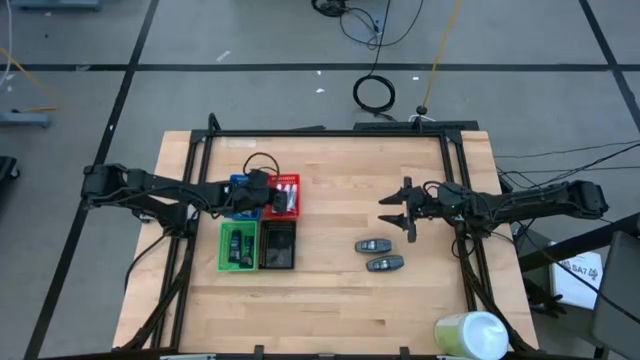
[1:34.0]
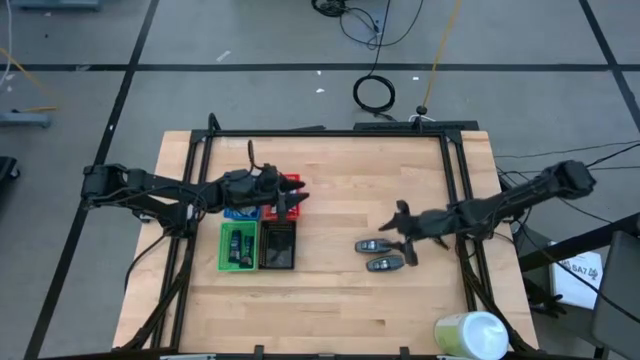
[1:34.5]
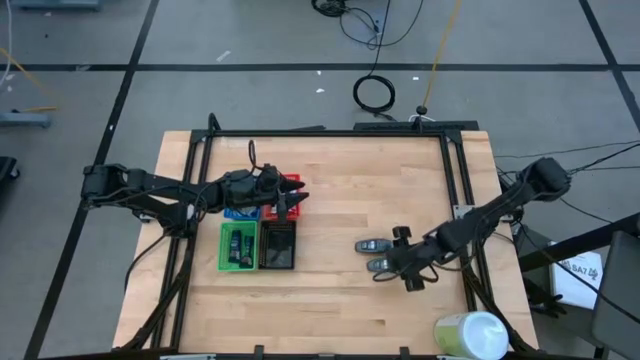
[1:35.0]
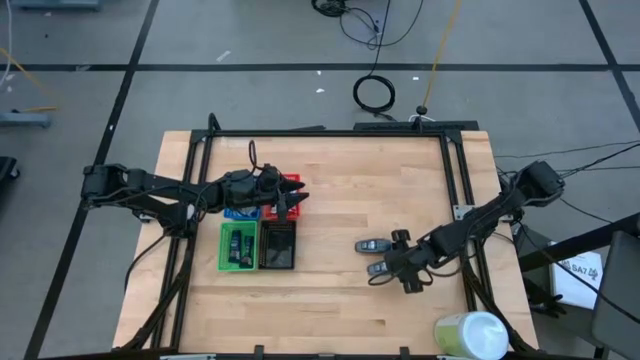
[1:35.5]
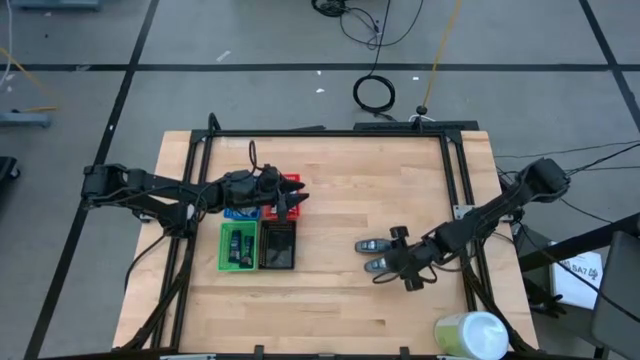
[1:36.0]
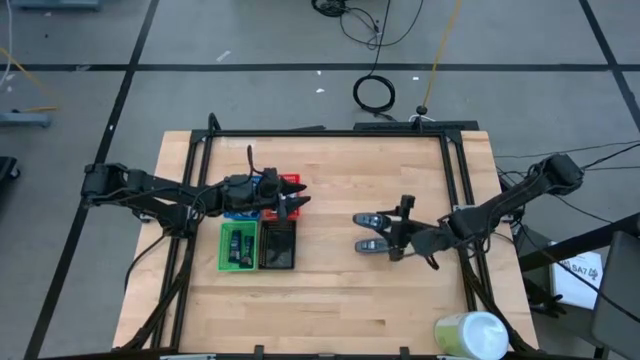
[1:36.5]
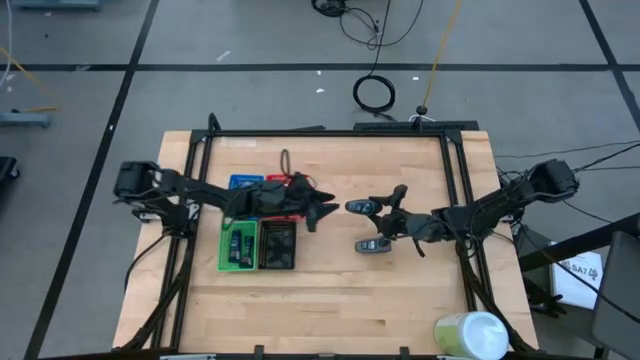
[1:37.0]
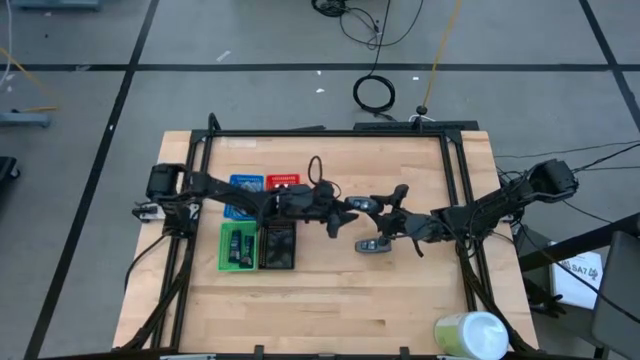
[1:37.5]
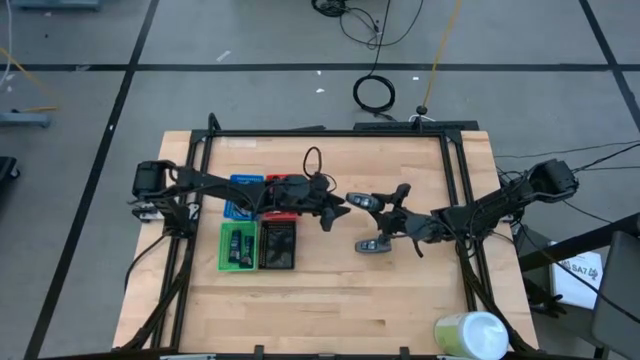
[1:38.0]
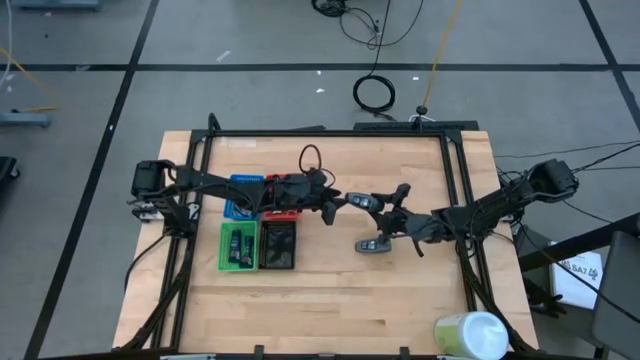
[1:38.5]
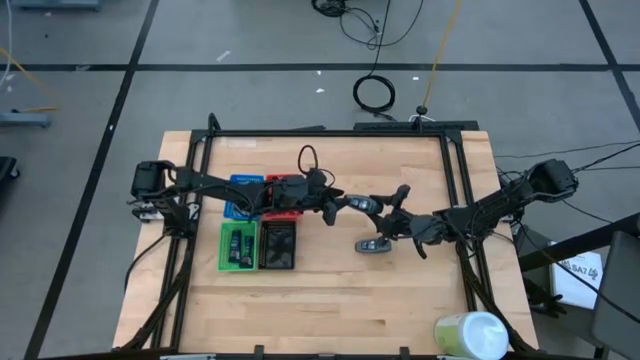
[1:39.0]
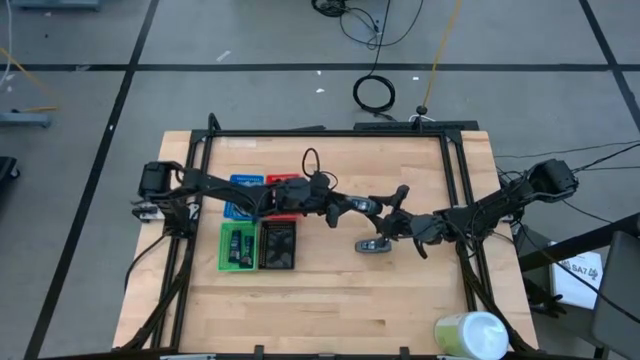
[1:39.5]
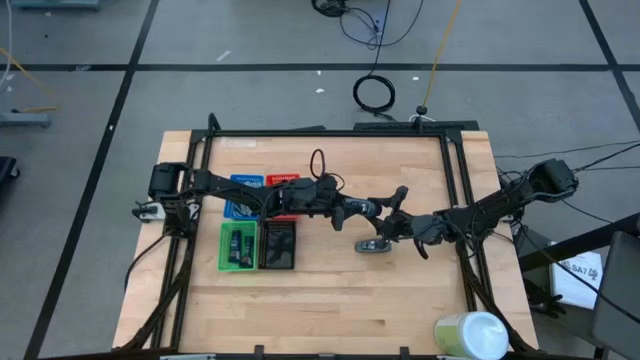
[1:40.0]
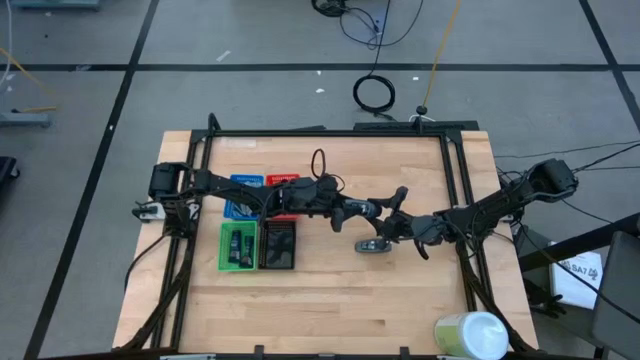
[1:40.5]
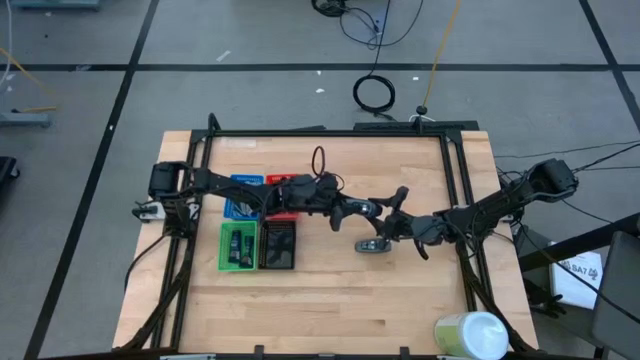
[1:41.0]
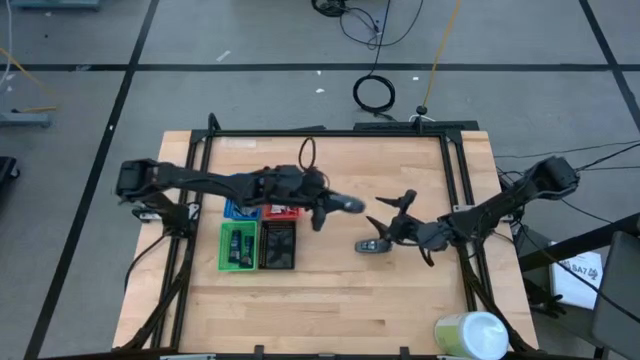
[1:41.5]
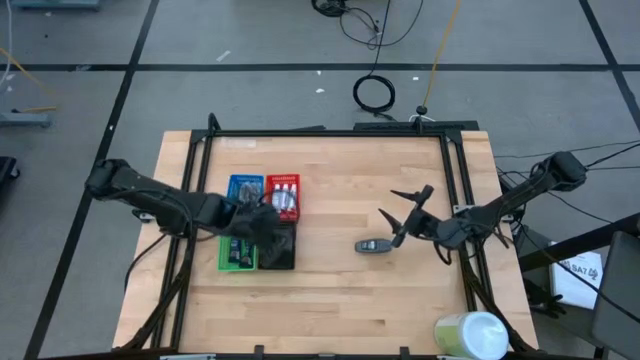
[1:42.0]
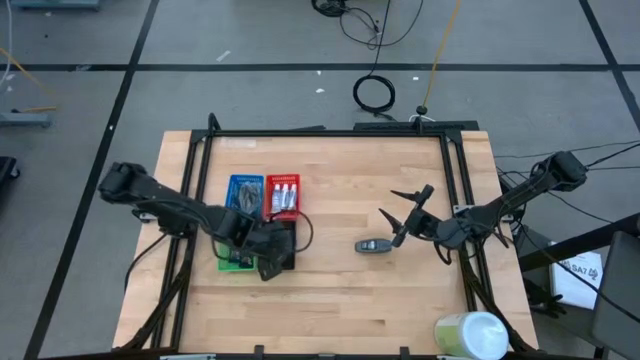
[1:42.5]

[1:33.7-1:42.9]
Task: Pick & Place Travel size toiletries
Put the bottom gray deodorant into the black bin

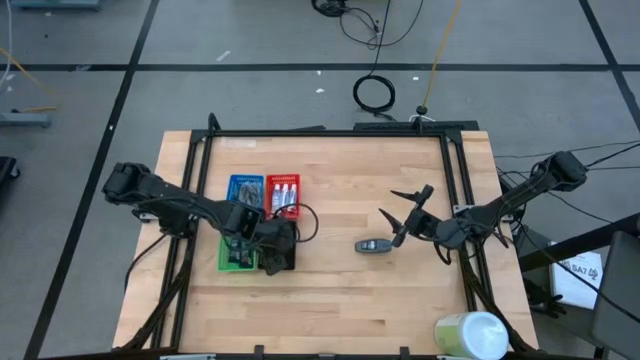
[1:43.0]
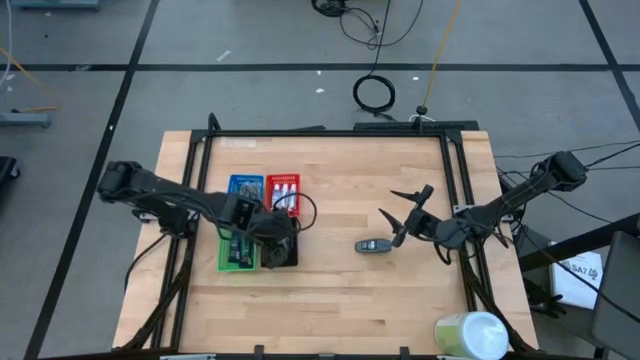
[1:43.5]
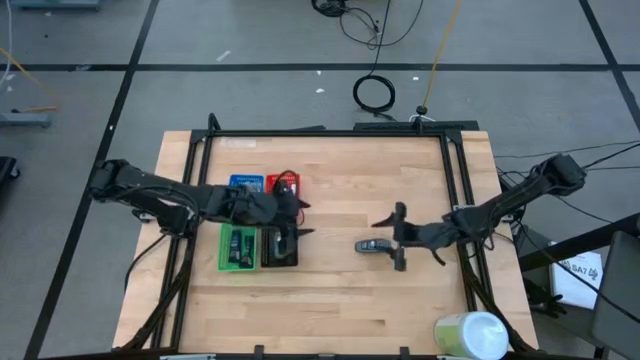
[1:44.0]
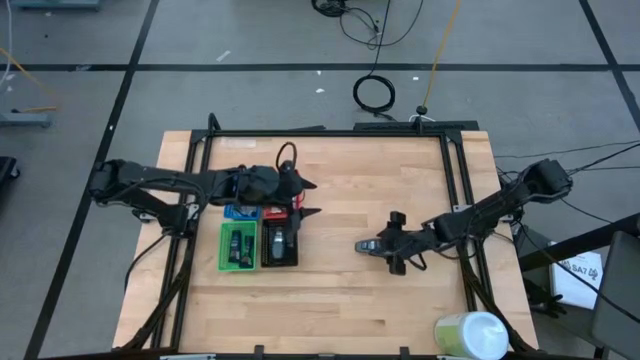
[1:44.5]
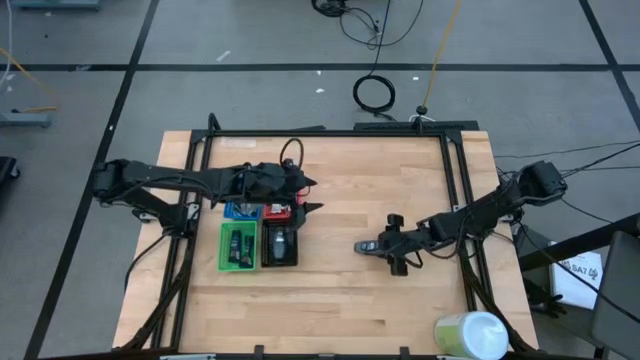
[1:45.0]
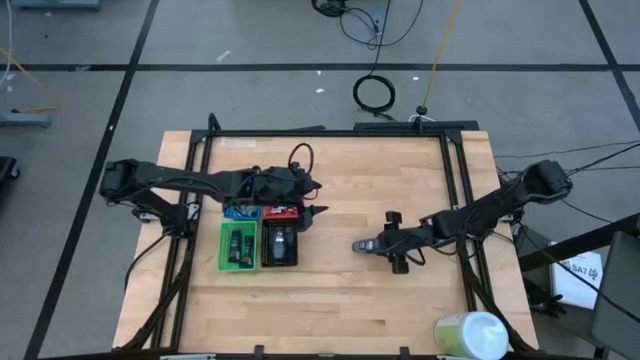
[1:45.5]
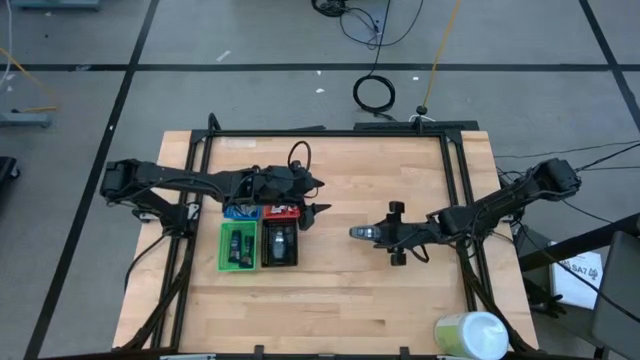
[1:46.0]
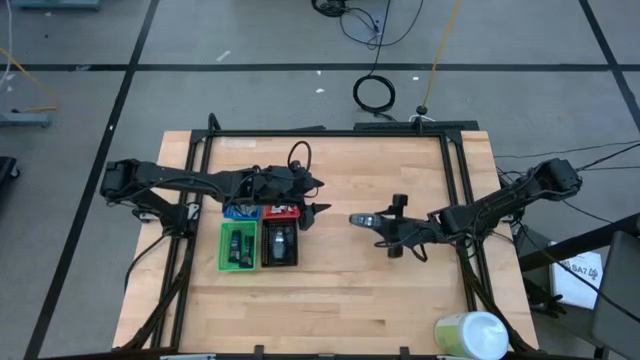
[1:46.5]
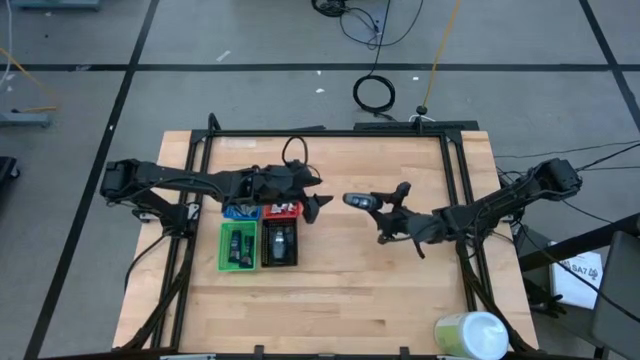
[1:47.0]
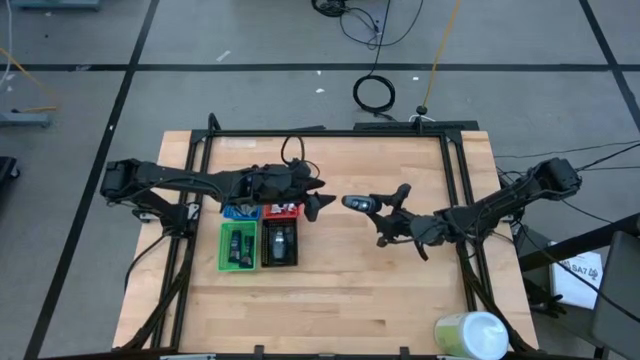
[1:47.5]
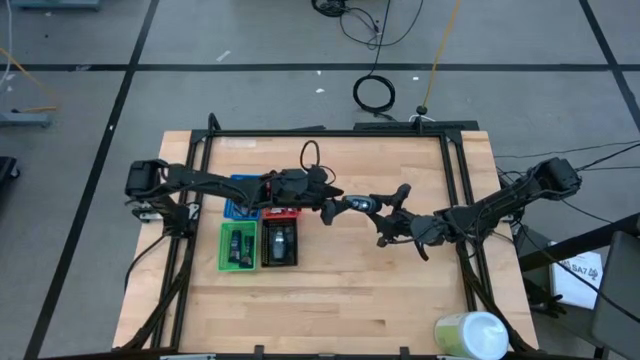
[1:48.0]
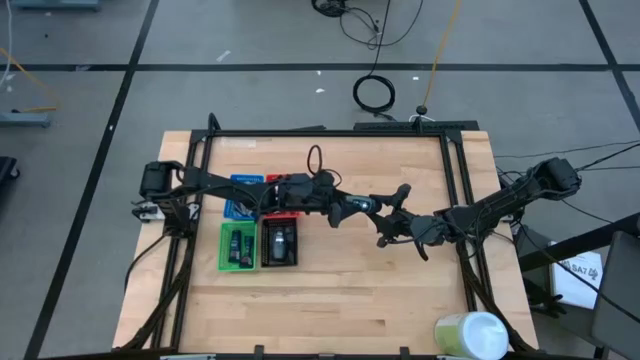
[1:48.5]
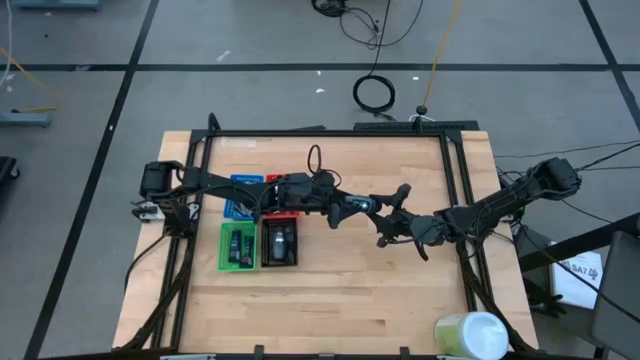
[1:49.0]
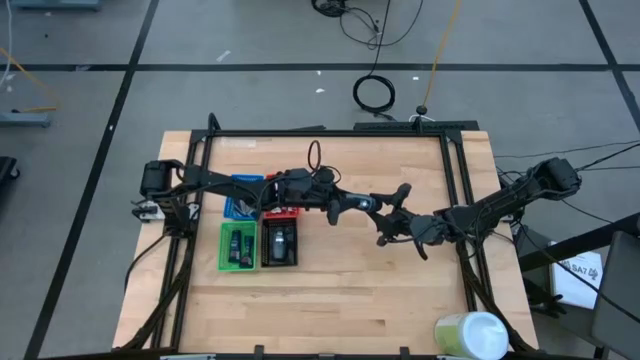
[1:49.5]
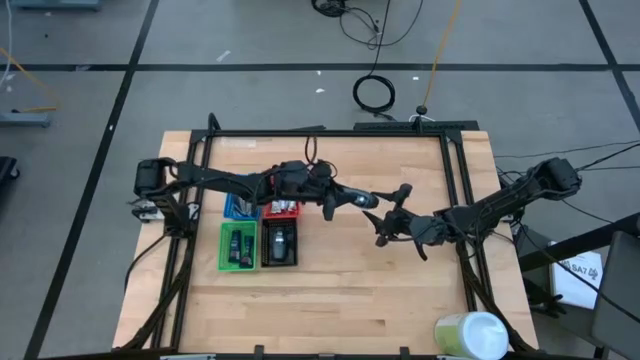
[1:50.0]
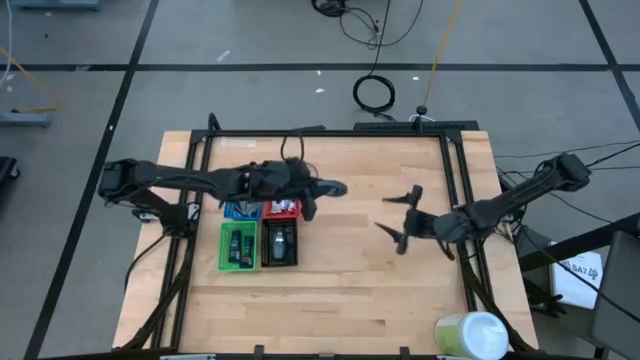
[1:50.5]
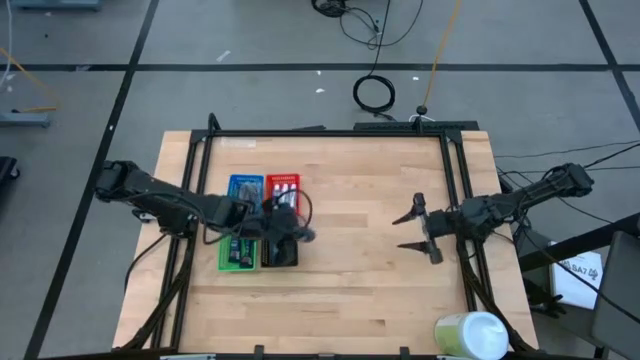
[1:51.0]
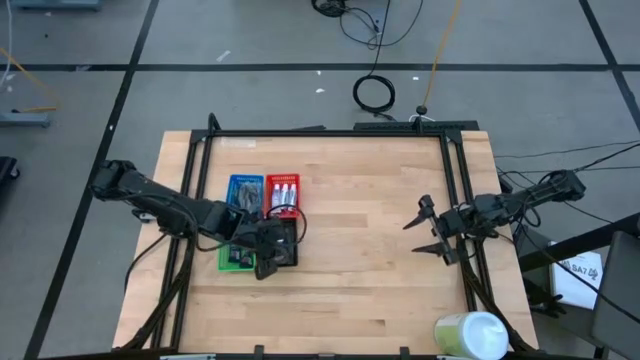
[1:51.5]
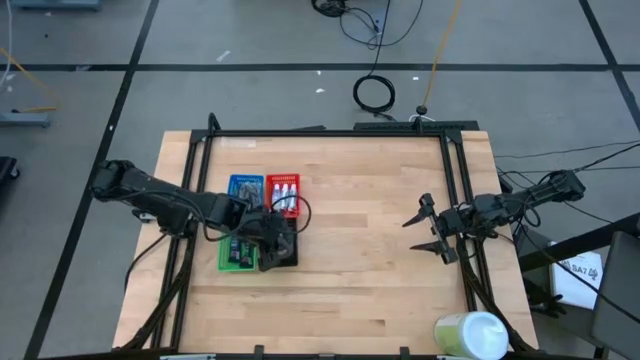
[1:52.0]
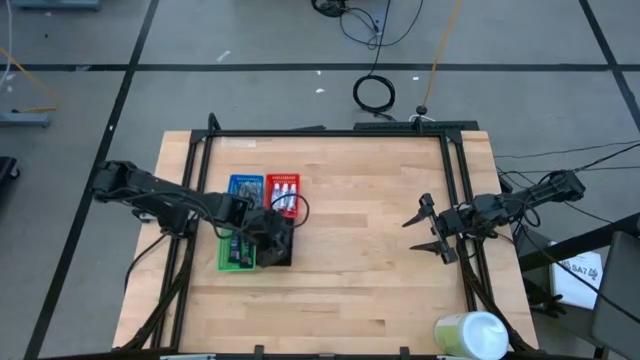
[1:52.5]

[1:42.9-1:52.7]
Put the gray deodorant into the black bin

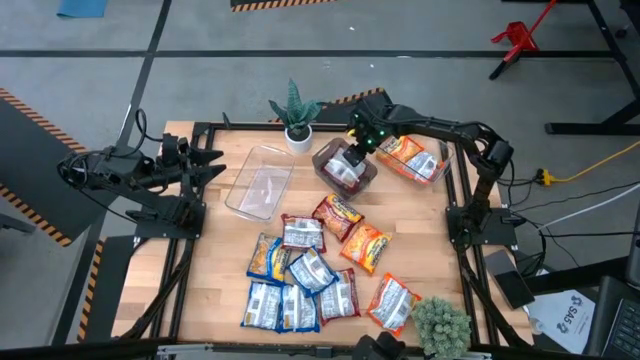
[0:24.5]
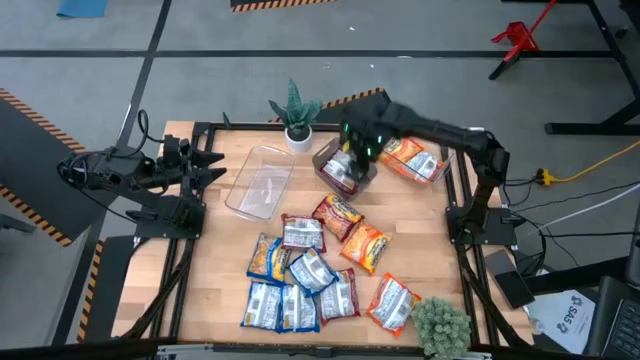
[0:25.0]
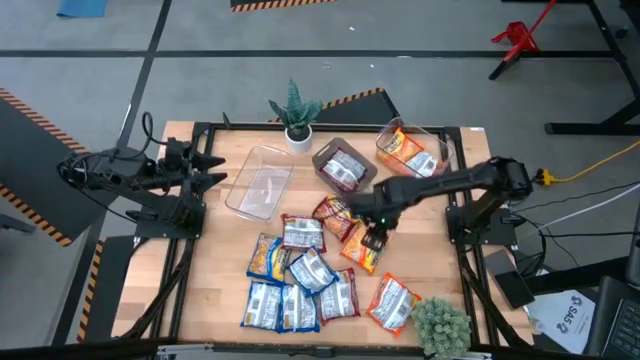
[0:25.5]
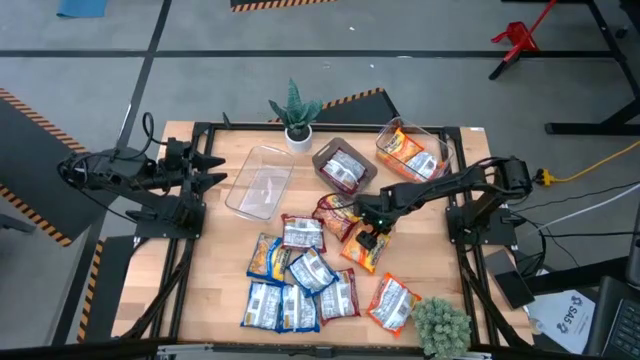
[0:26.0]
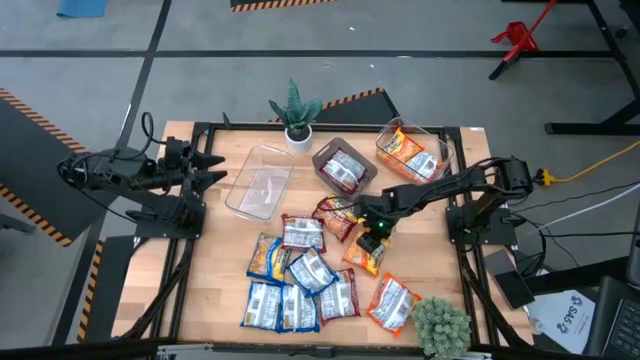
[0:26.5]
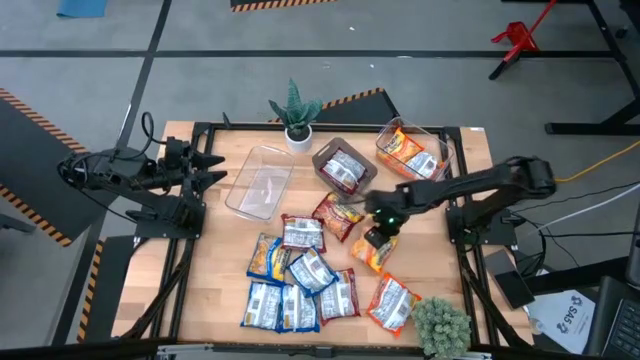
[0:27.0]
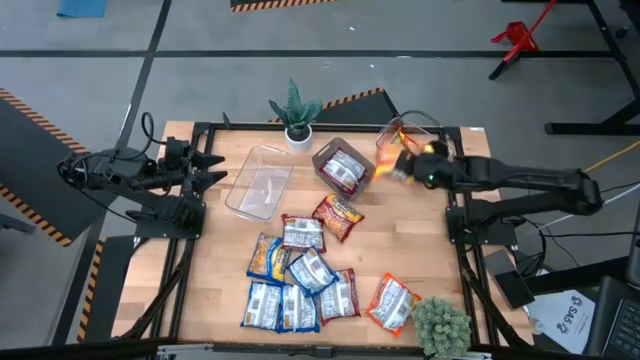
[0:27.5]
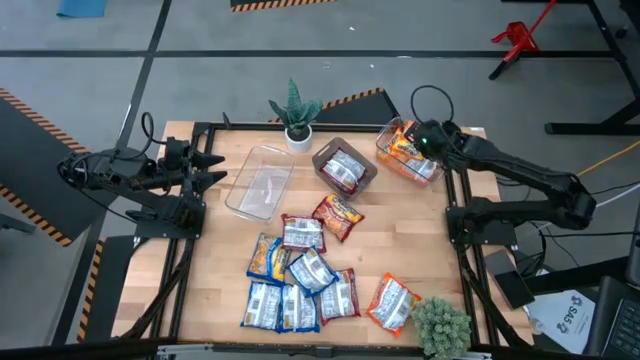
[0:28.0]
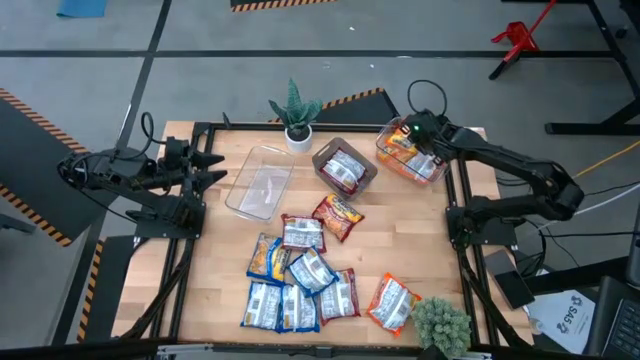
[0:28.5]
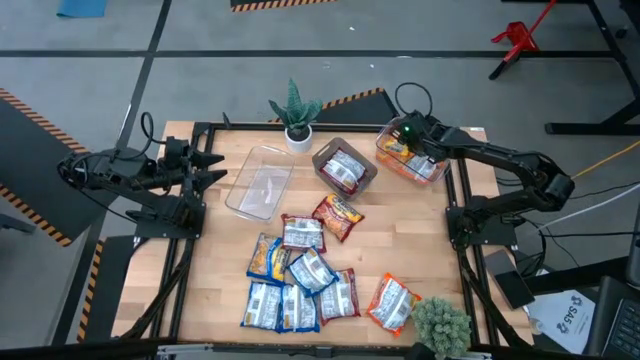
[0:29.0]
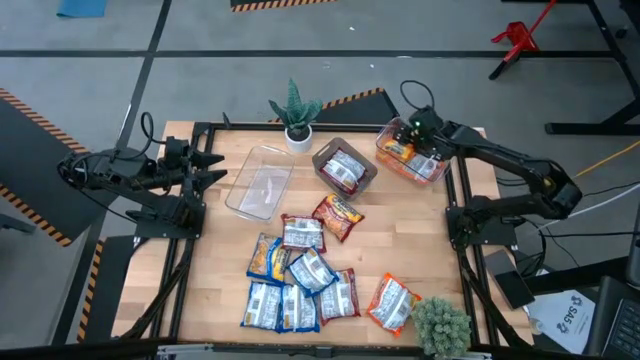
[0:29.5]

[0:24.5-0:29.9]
Task: Sort Maruchan noodles
Put the orange noodle pack into the right transparent bin
